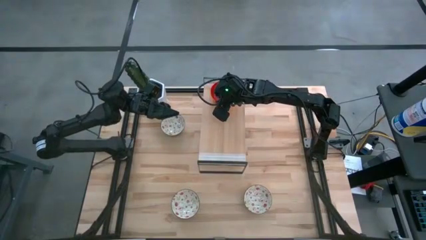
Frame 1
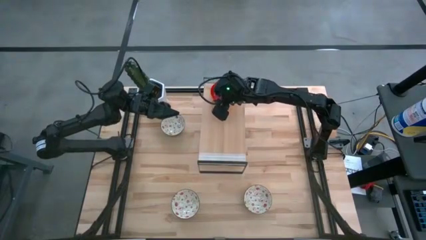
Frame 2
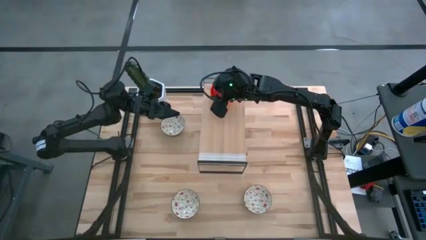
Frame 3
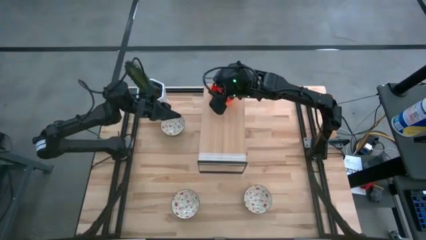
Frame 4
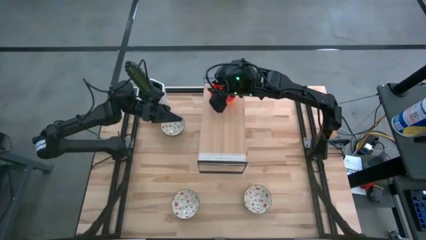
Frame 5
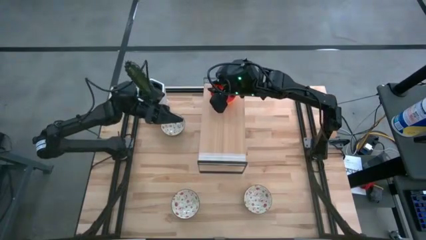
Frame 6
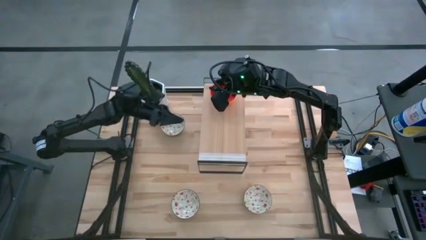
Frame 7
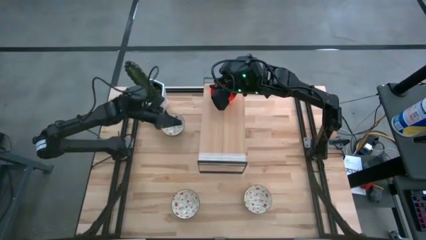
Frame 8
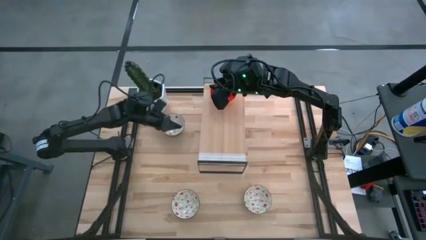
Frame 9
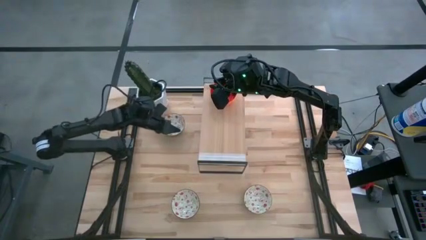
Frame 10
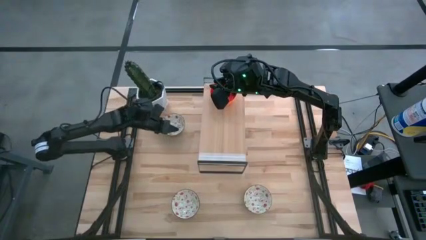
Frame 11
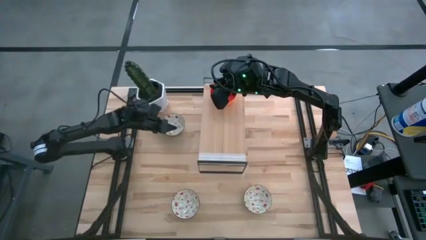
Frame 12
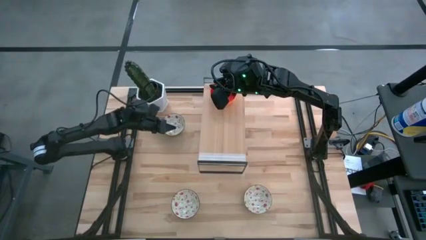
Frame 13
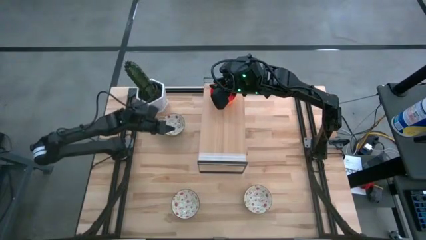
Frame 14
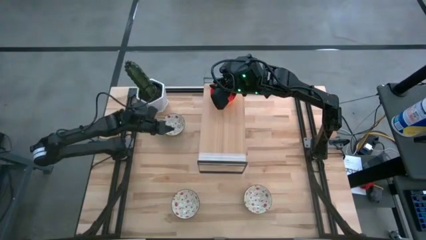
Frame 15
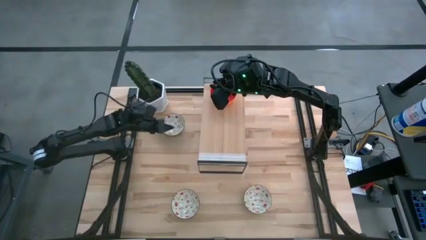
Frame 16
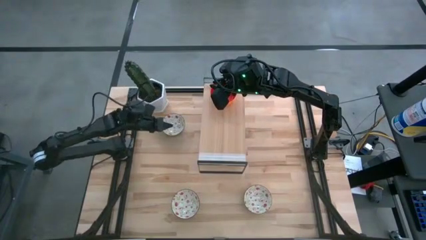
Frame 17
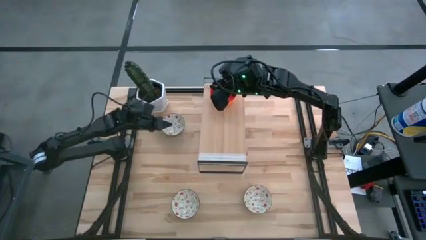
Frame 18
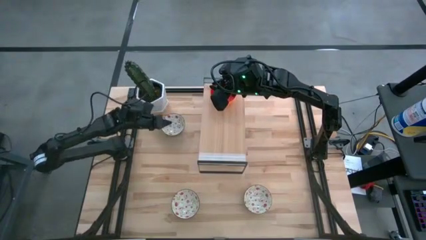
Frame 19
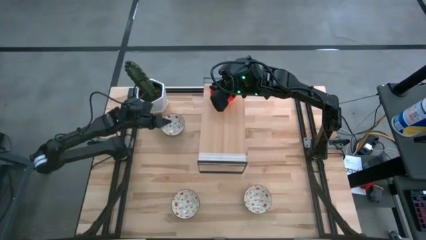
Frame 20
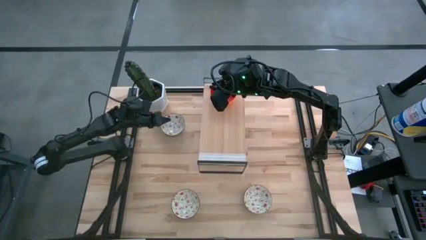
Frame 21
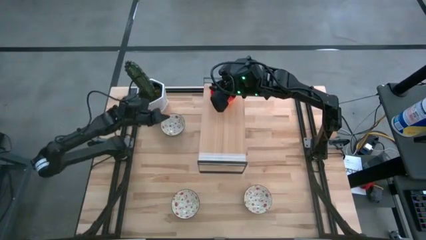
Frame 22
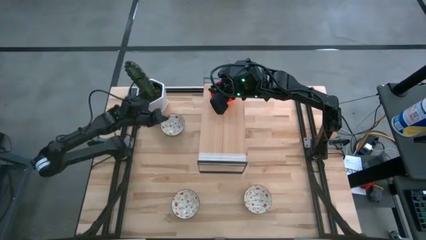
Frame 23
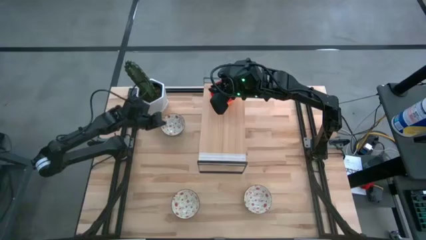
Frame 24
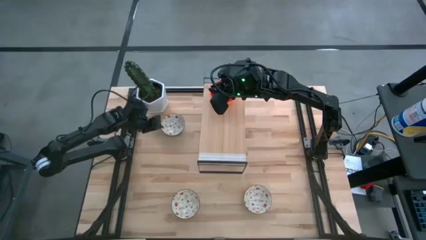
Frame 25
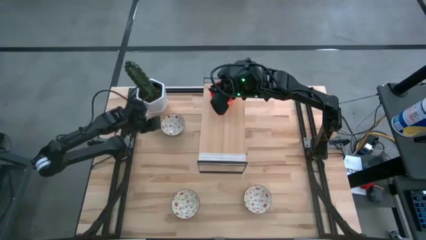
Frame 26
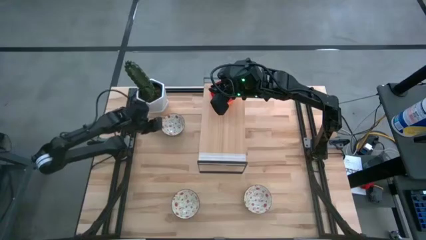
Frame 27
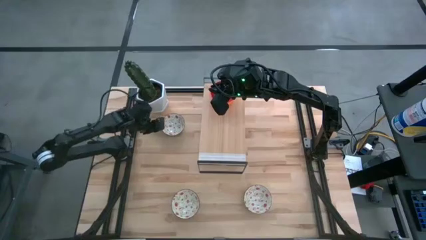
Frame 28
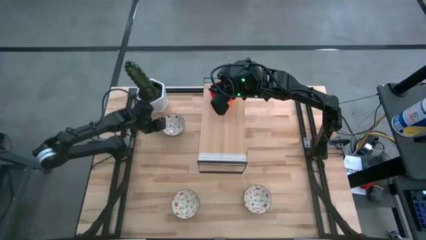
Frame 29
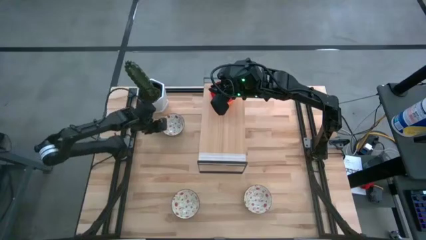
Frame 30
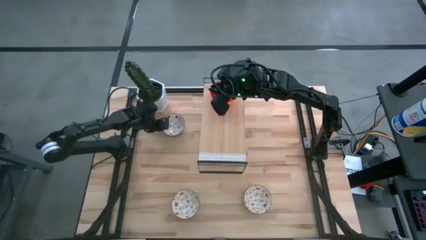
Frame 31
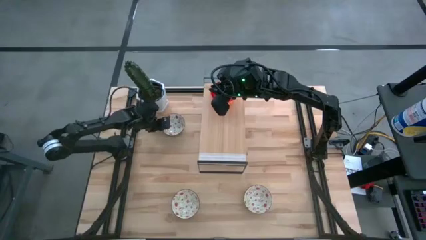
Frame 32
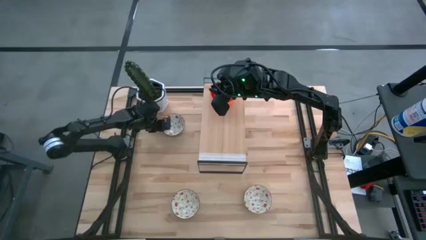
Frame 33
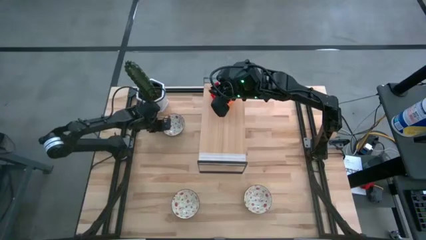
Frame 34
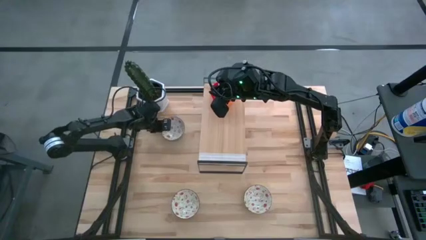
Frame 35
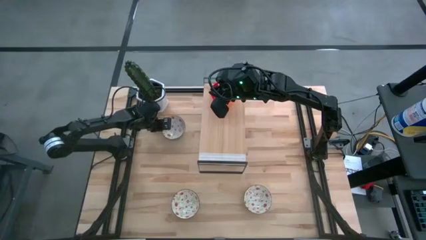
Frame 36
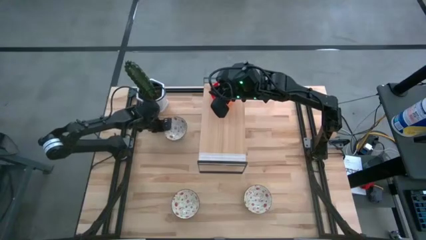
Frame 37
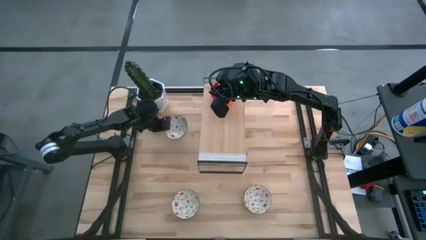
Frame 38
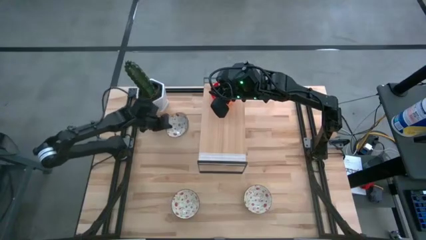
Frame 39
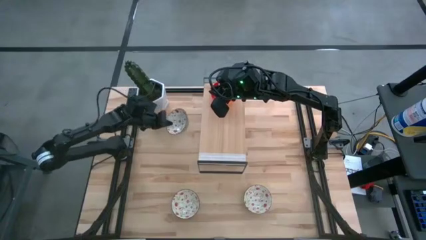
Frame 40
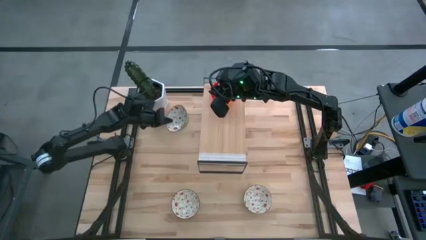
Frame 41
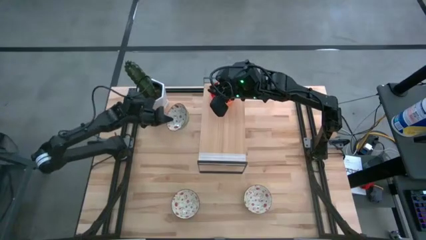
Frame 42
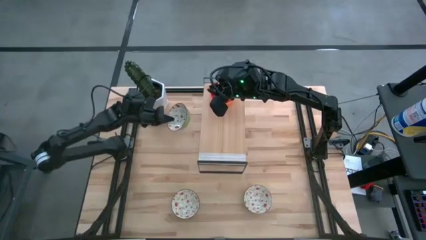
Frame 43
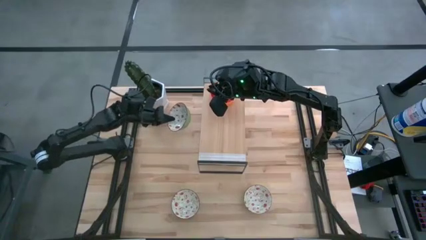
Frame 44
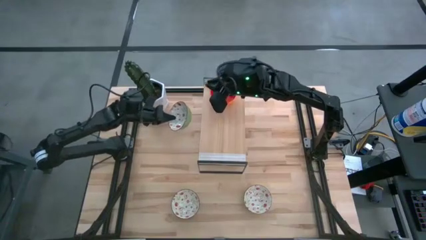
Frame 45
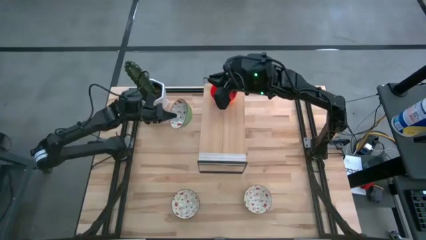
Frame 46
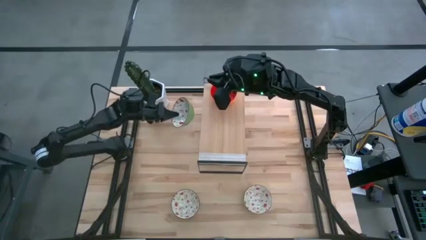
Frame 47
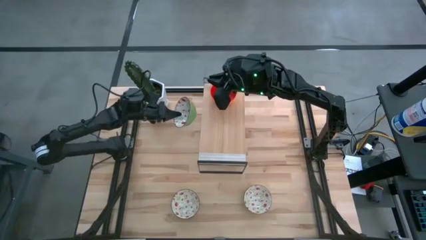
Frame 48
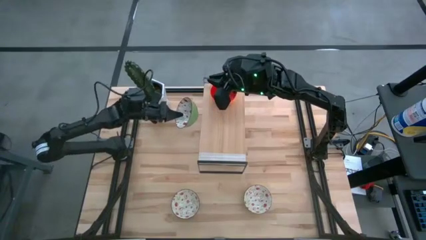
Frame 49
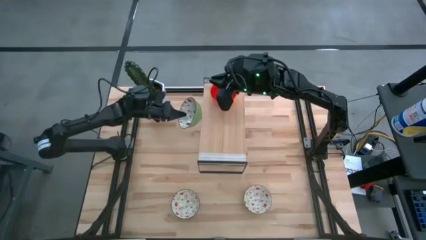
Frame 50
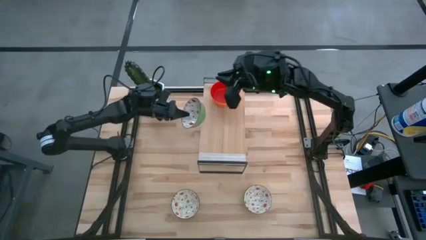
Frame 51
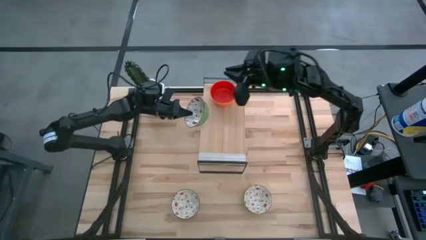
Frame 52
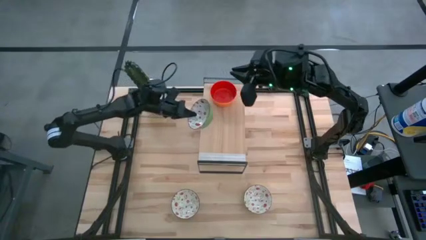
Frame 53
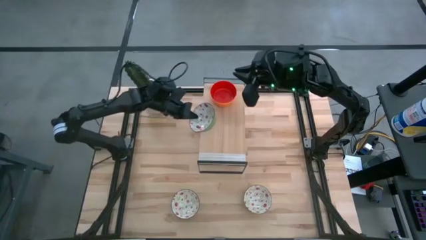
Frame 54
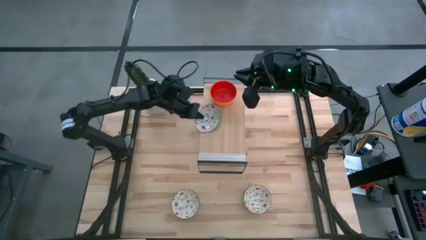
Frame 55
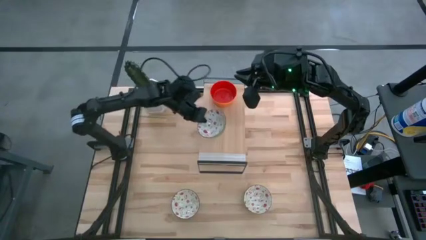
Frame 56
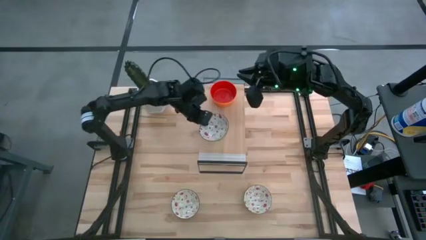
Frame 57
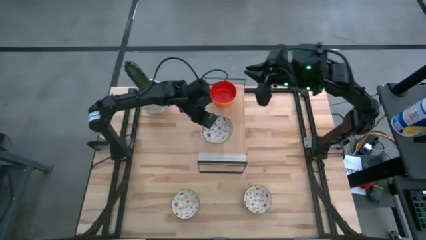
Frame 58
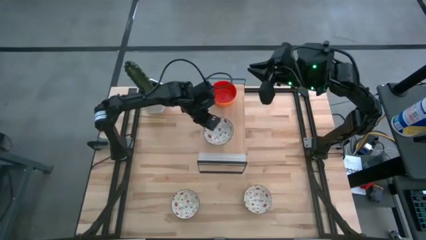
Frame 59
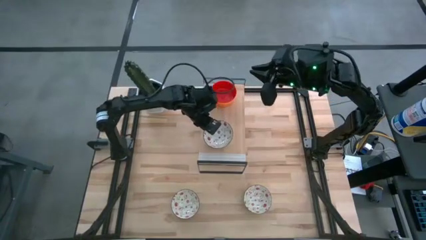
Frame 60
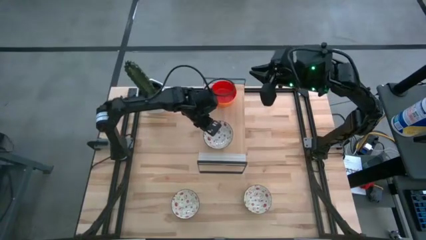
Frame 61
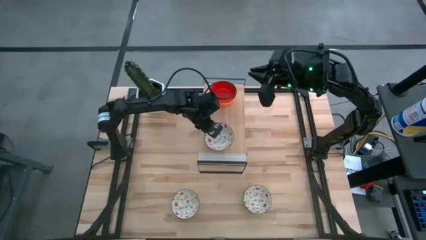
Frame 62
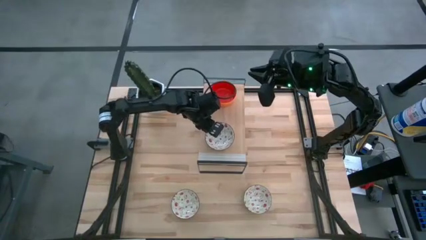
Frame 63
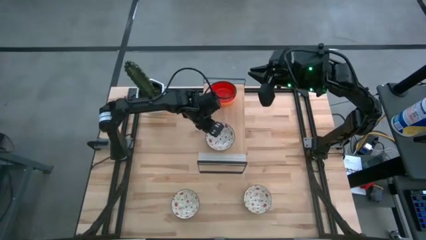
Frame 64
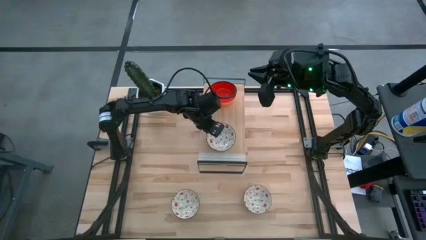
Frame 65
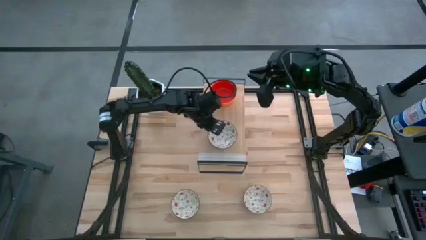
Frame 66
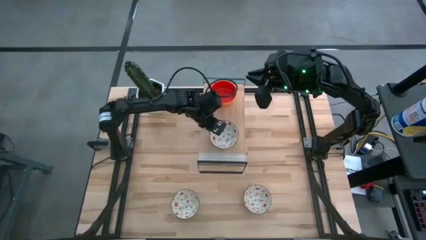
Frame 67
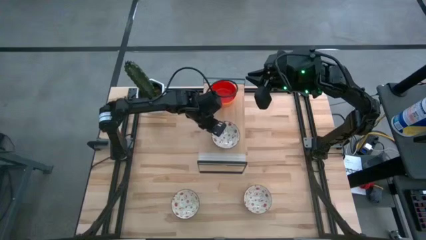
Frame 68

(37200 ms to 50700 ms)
Task: Pick & Place Mini bowls
Put the white patterned bowl on the shelf
